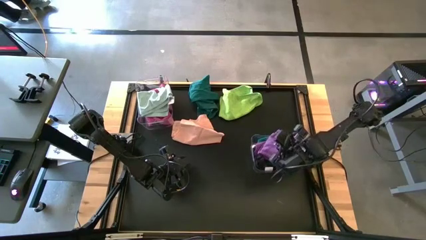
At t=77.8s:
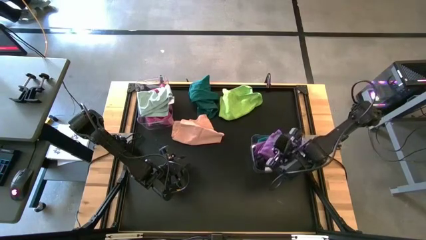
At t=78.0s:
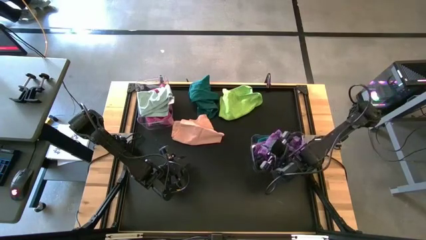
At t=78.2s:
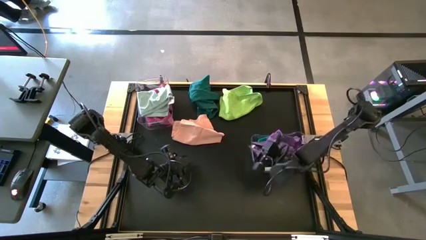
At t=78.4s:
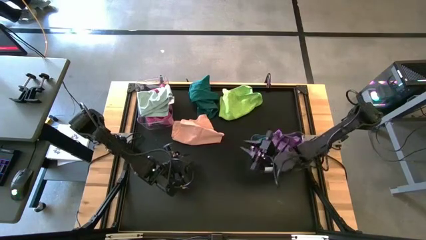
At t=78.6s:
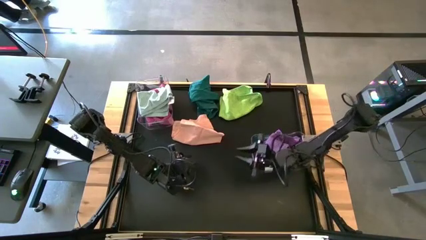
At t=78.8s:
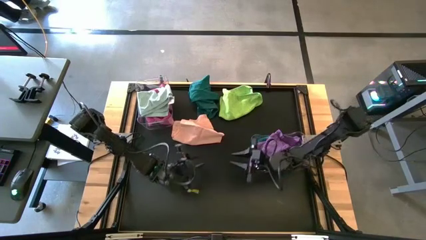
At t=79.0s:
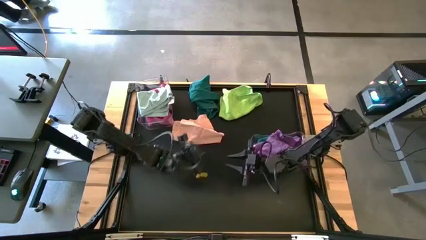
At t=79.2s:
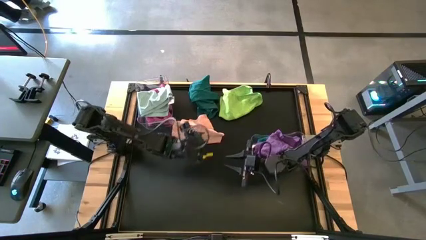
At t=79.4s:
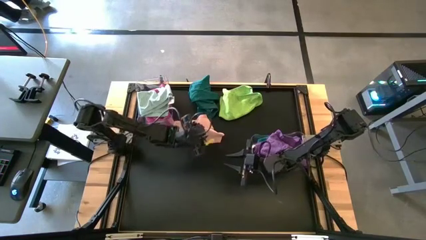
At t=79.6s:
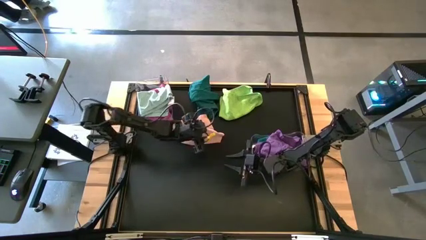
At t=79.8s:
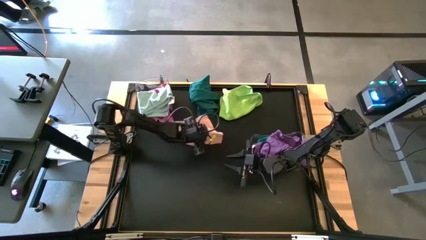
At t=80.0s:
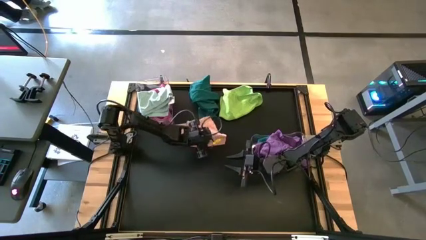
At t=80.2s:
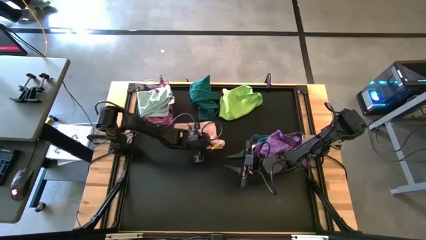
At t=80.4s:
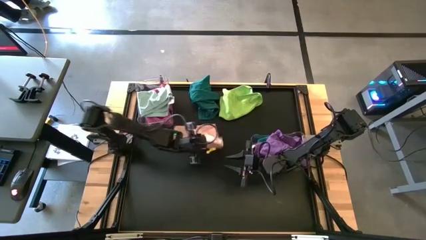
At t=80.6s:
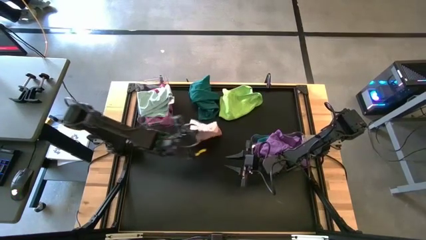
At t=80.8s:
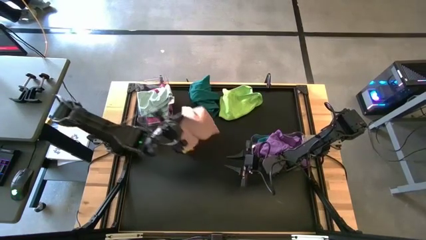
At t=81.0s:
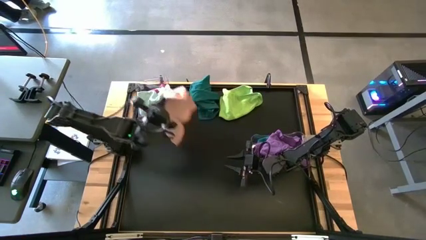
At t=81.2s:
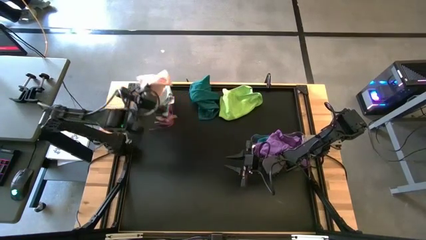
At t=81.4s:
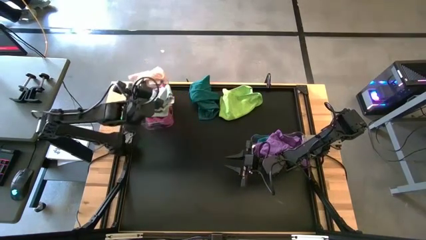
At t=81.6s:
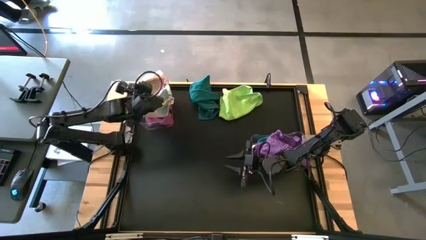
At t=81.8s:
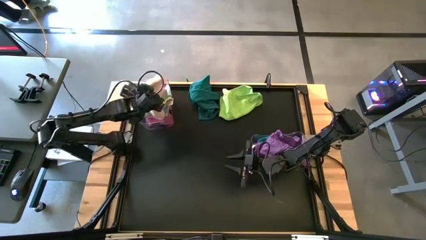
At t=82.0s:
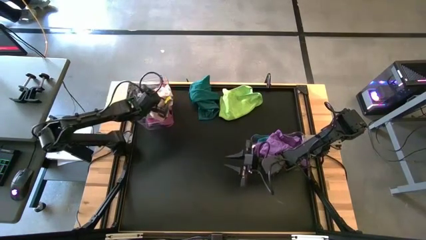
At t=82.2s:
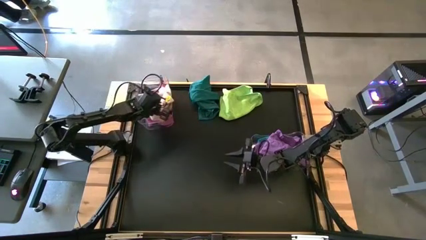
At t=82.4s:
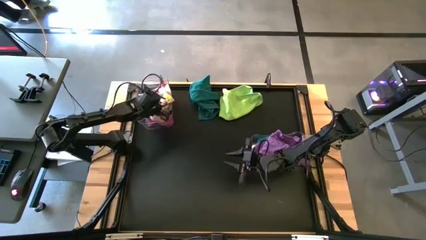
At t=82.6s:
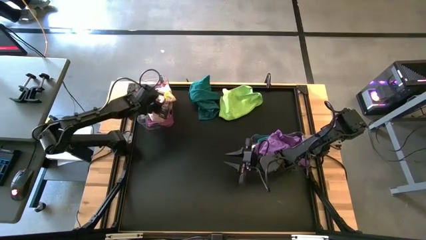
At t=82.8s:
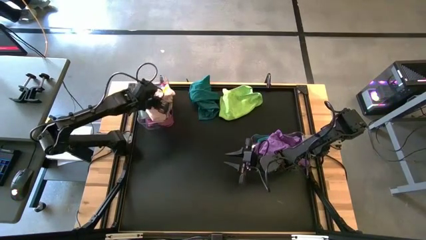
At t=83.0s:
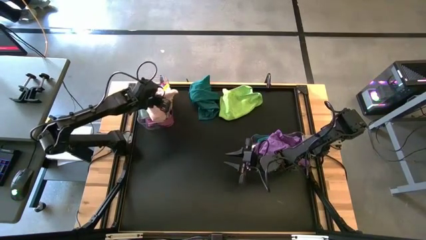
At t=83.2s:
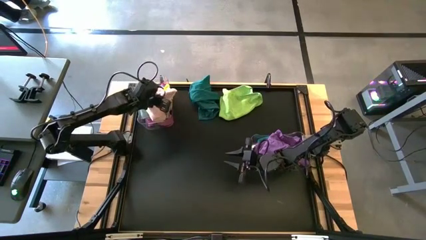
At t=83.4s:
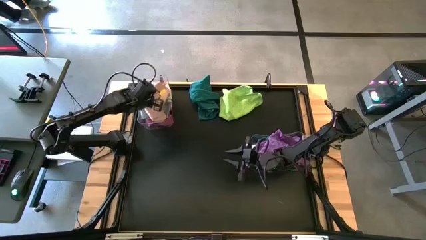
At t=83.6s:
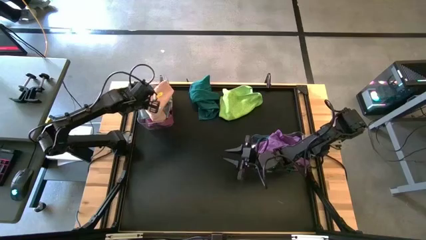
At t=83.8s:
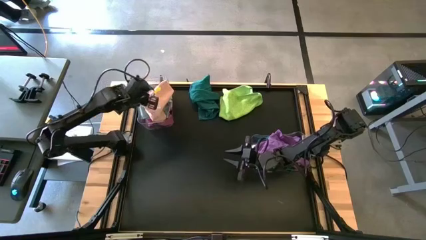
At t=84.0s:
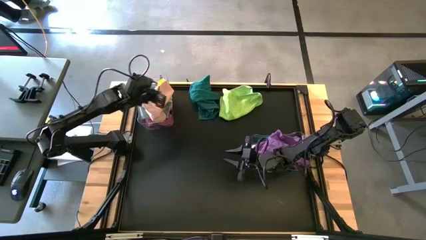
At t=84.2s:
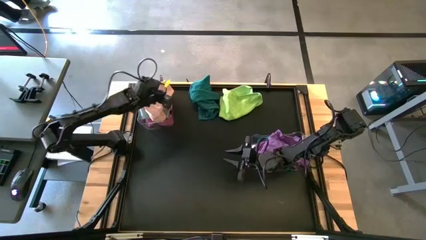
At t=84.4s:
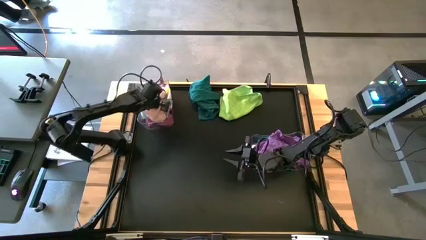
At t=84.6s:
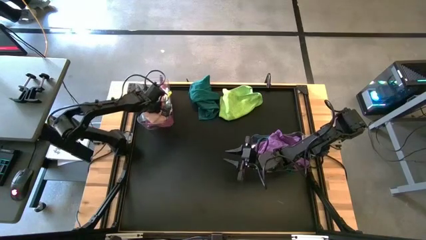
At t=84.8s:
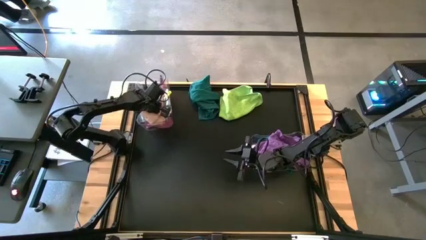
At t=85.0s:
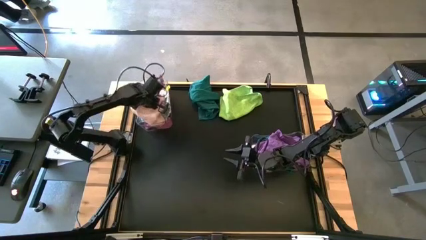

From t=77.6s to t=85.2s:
Task: Sort towels by color in basket
Put the orange towel into the left transparent bin

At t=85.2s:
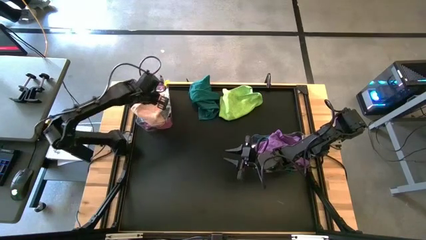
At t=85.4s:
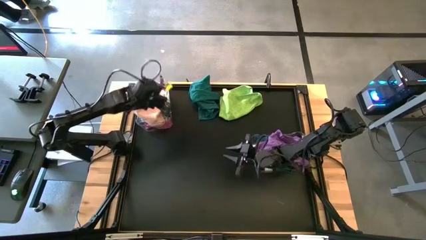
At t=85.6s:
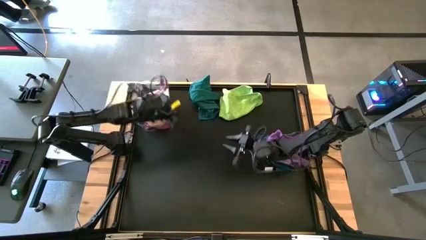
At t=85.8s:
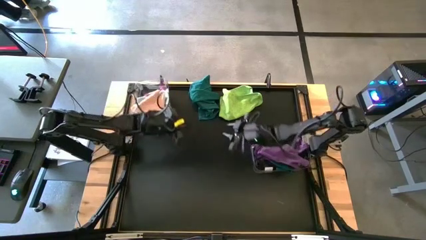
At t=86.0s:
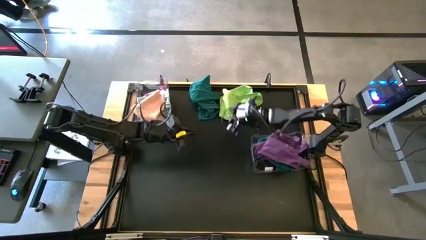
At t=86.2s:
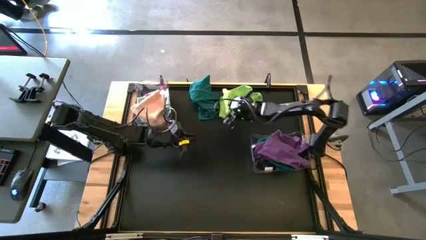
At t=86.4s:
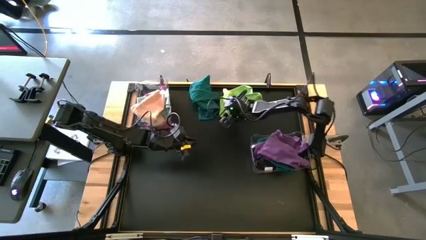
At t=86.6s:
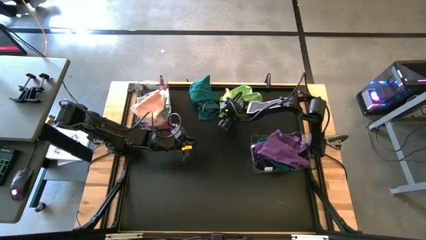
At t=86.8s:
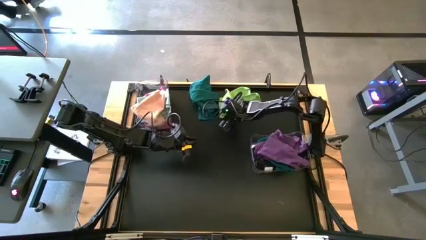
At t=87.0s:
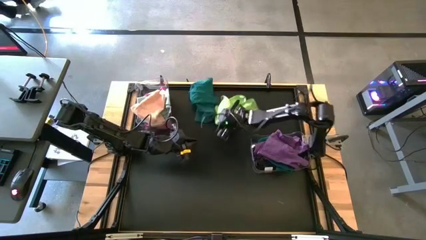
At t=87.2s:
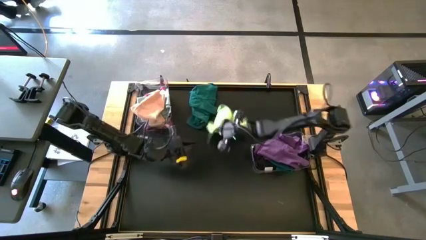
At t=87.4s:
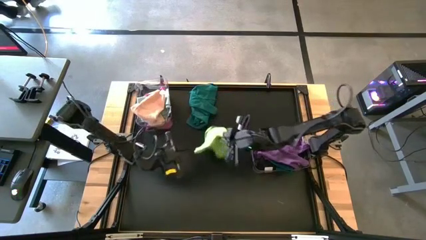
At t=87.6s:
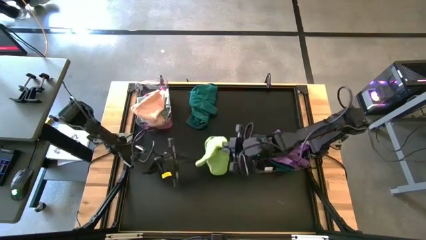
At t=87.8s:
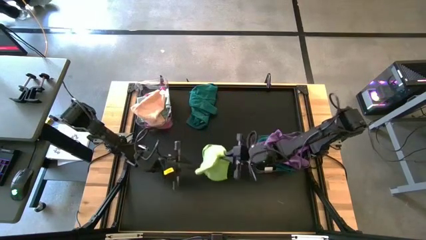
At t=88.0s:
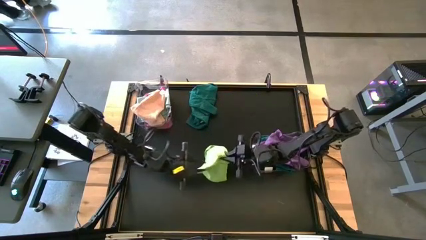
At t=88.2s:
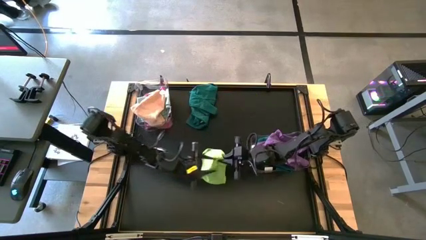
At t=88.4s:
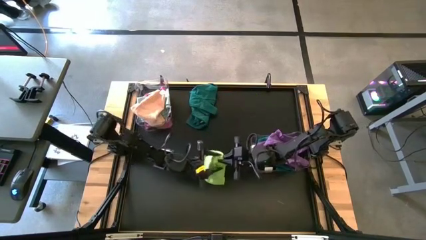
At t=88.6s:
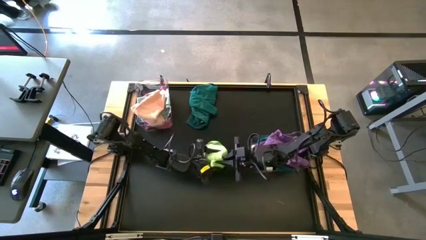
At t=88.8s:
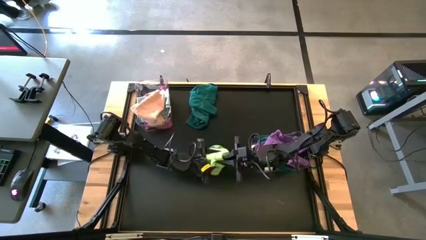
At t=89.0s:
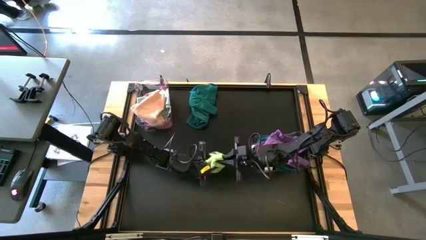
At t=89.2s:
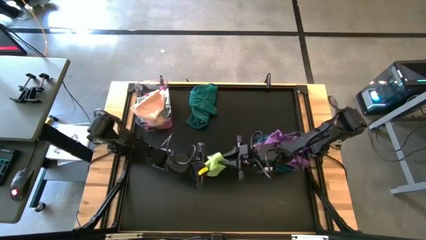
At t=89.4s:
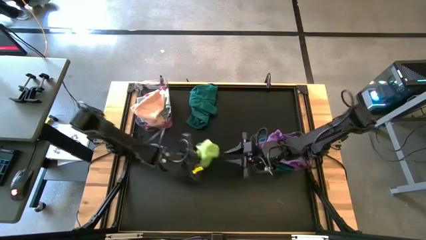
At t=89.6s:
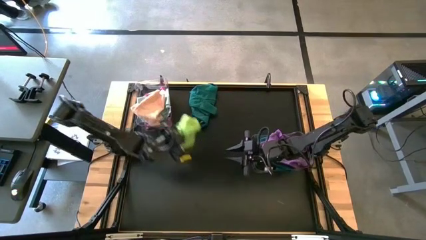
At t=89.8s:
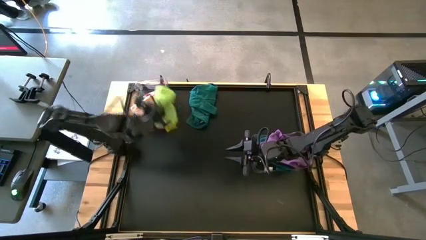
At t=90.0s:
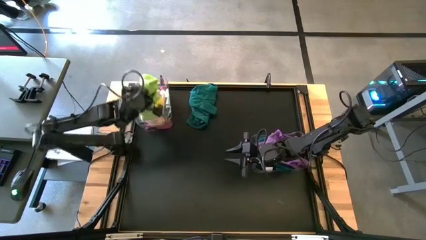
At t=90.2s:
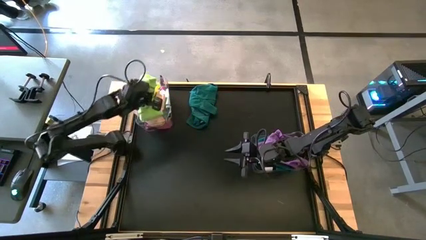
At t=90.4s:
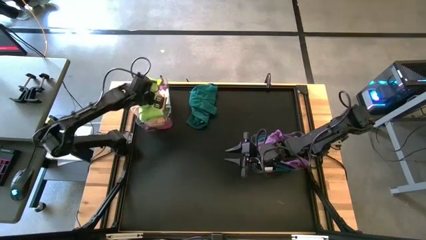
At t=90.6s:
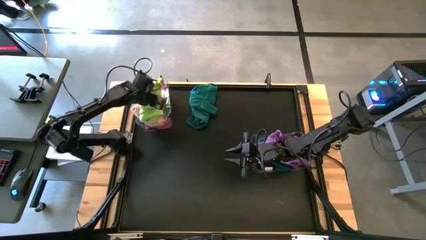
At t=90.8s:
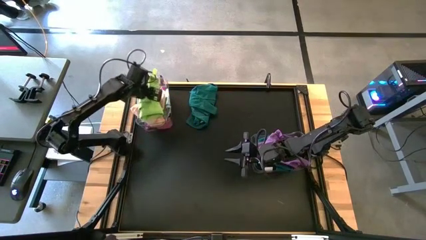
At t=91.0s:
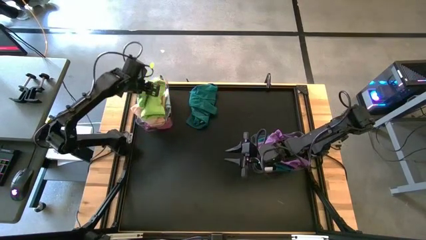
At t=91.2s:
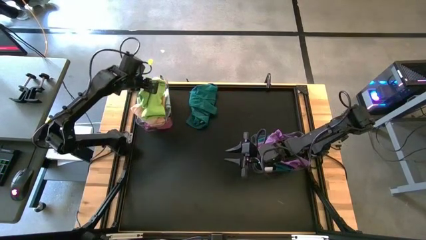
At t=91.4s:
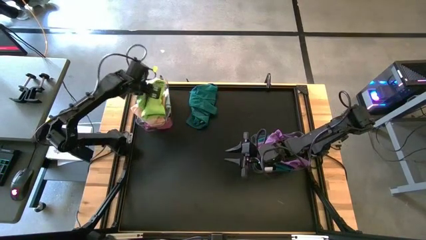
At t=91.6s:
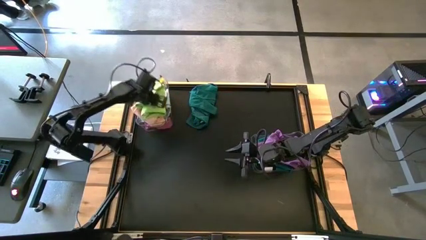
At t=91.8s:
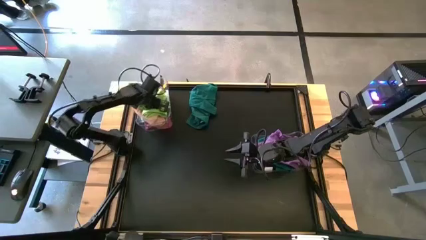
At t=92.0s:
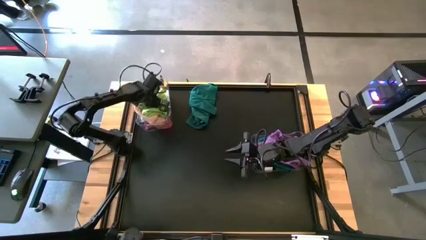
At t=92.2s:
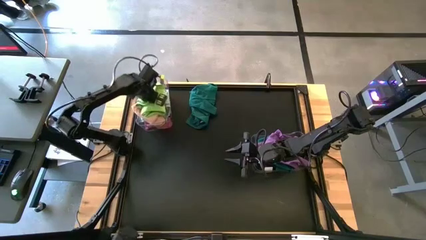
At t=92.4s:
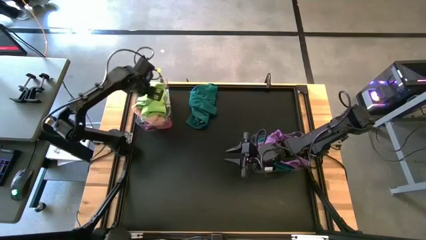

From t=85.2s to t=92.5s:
Put the light green towel into the left transparent bin
